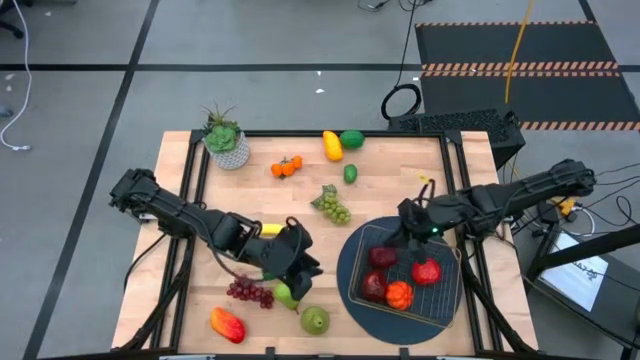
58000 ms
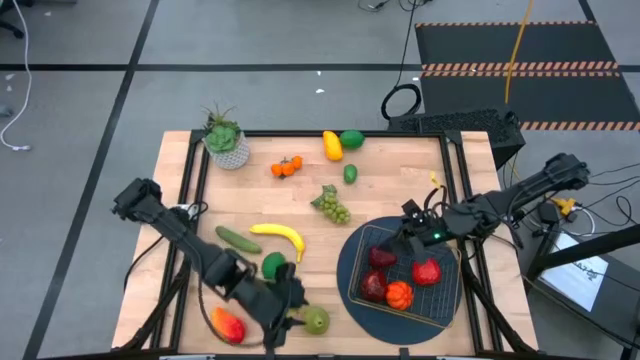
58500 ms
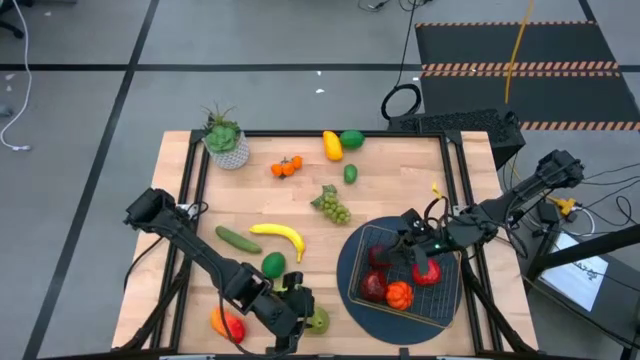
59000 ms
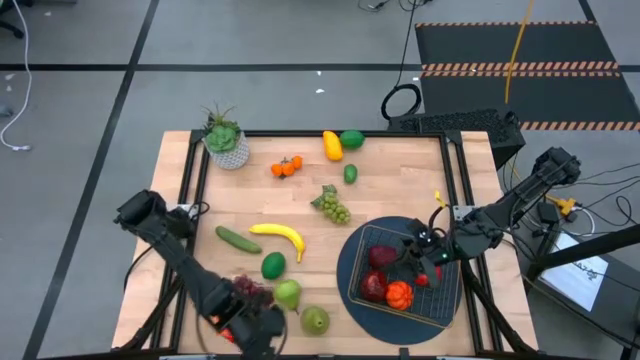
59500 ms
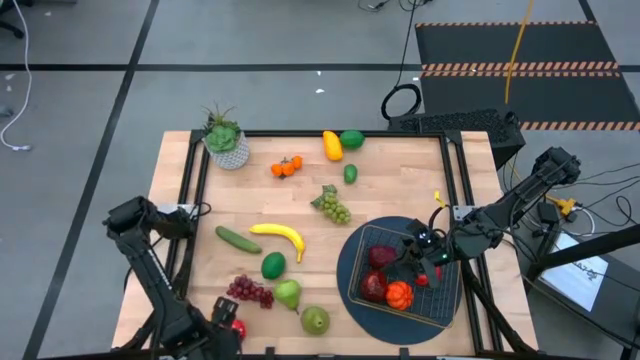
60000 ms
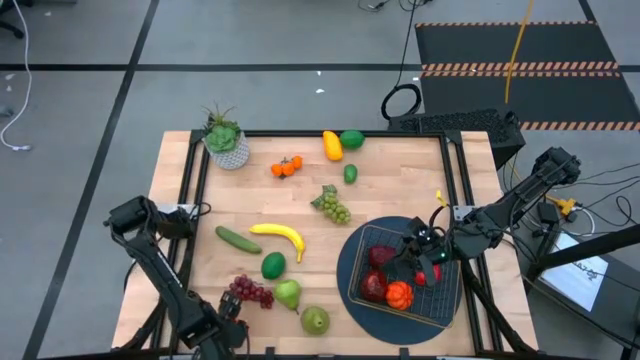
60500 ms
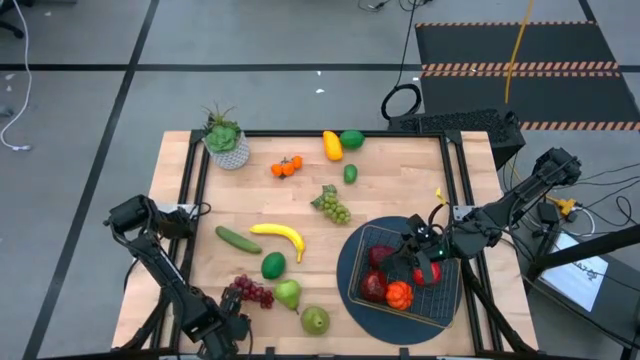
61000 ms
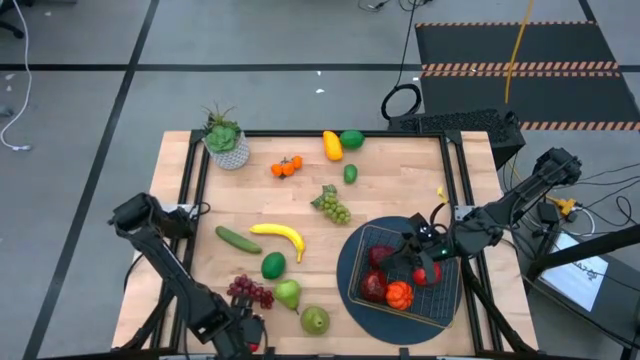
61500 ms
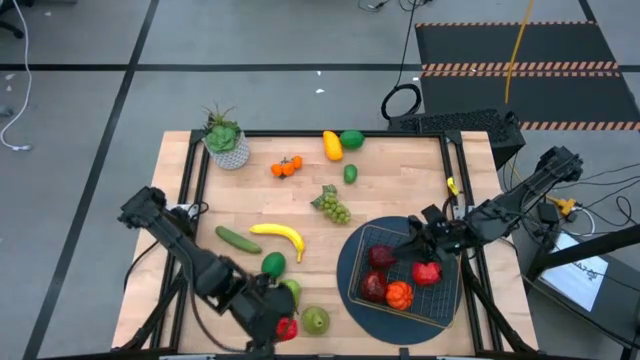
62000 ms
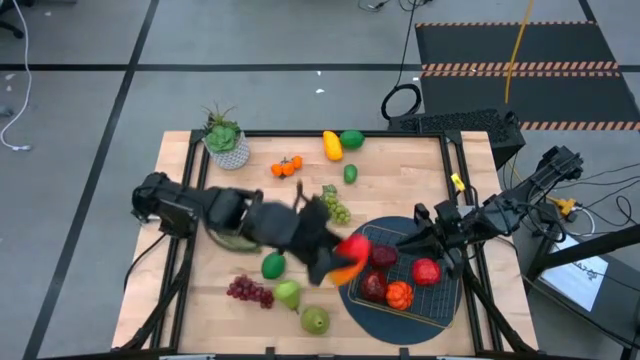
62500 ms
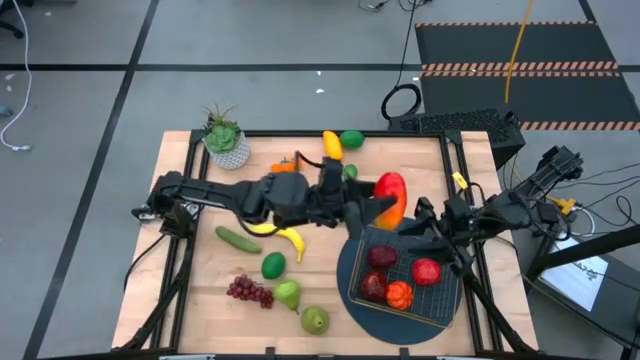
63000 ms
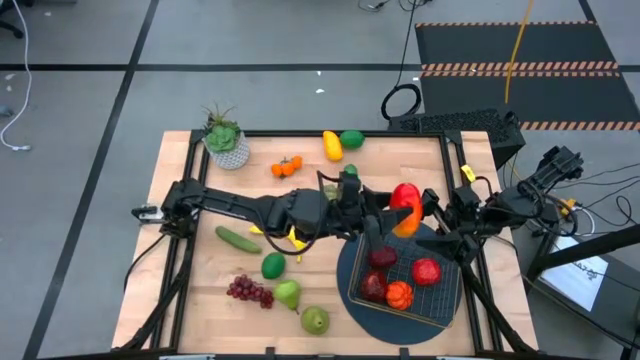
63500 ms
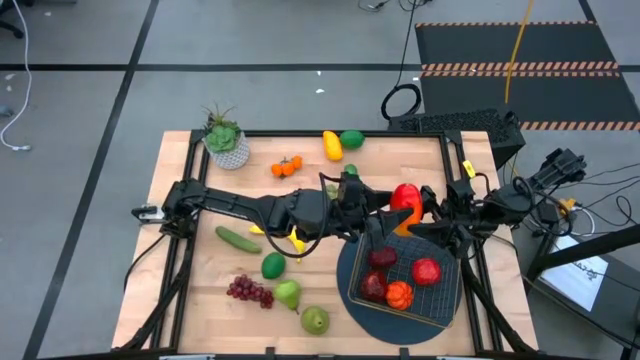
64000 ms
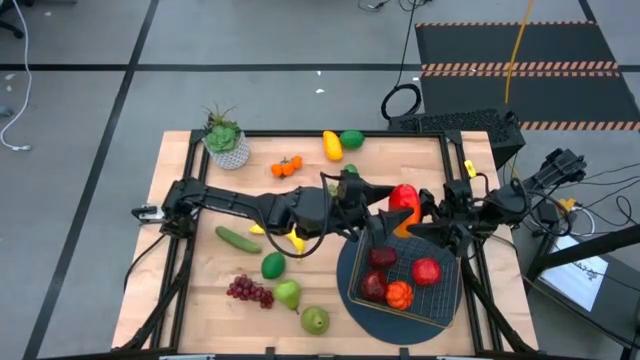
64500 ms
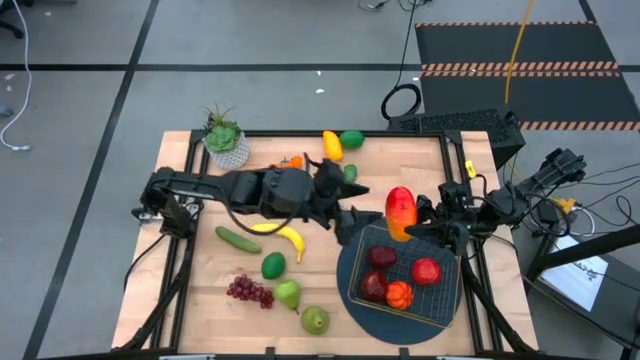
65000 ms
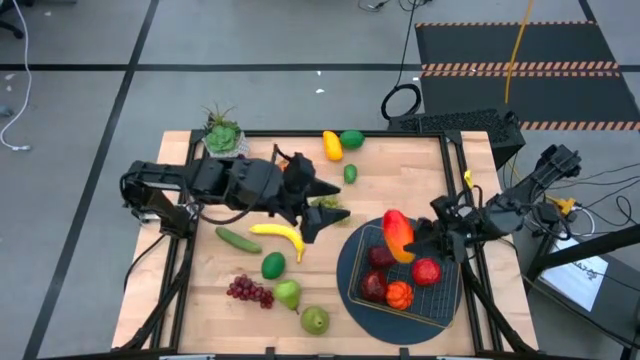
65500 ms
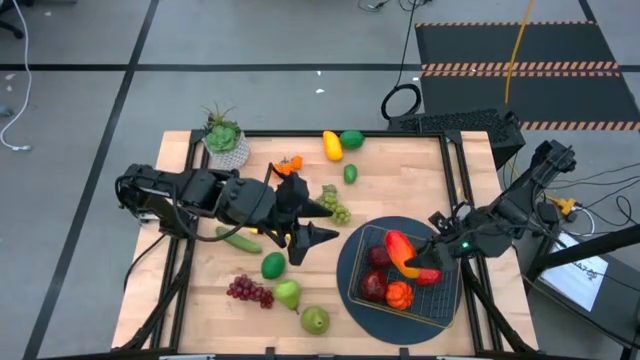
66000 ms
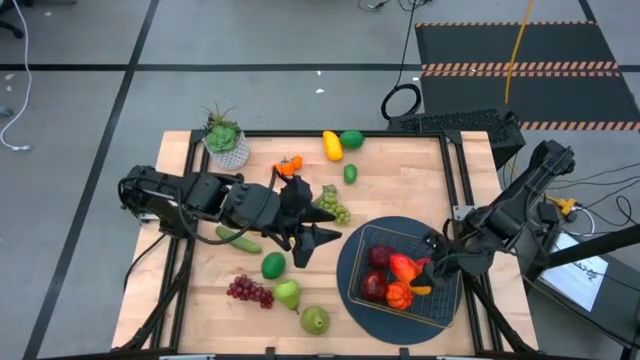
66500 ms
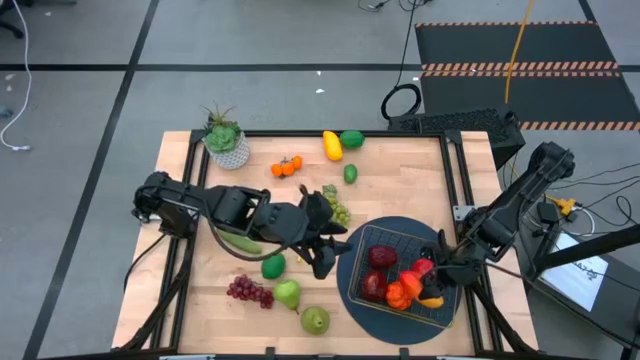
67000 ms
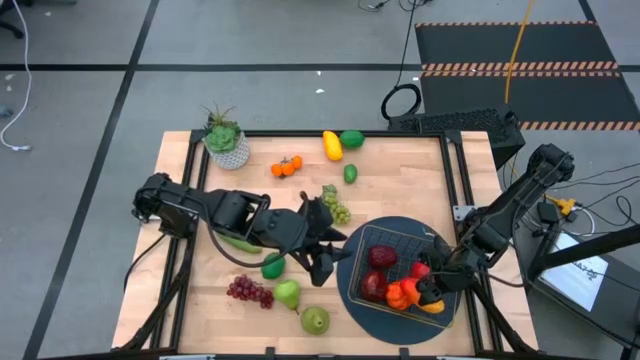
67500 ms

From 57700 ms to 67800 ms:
Task: Build produce basket
Put the bottom mango into the gold wire basket

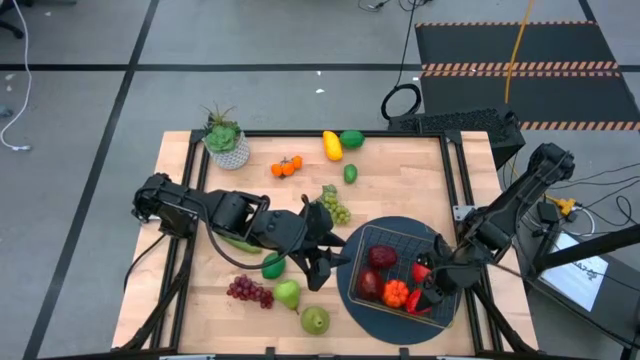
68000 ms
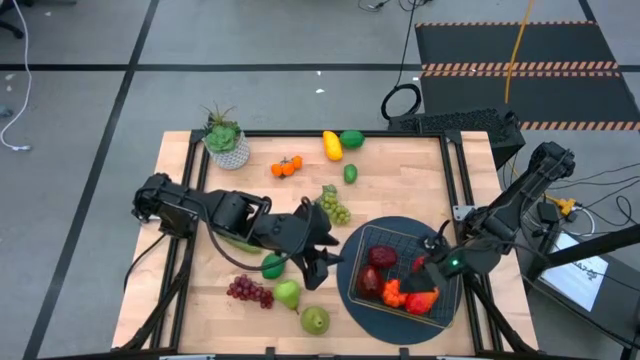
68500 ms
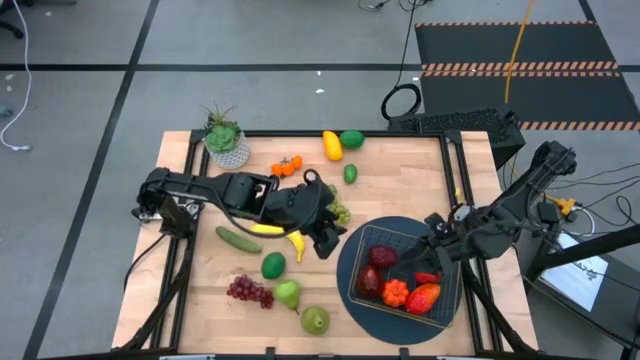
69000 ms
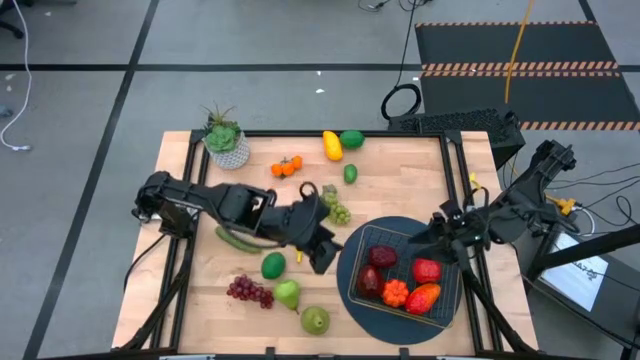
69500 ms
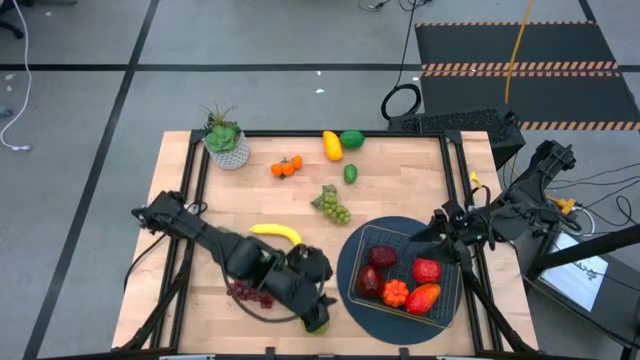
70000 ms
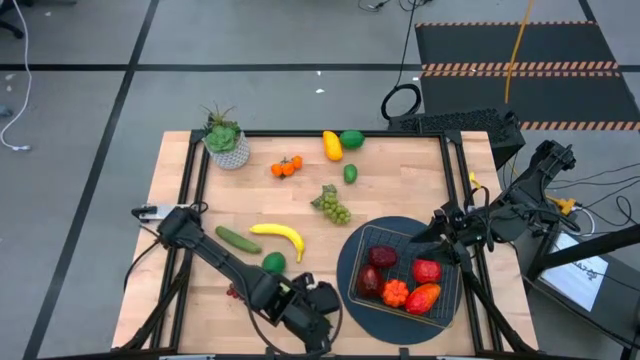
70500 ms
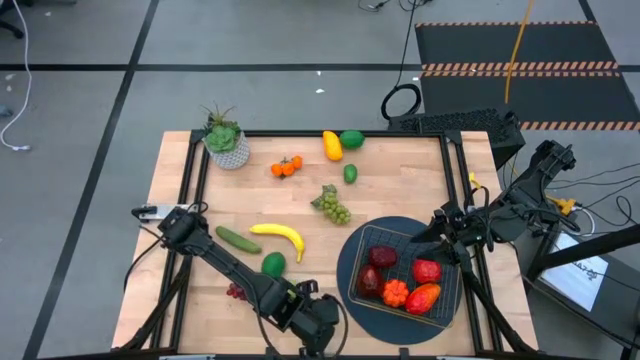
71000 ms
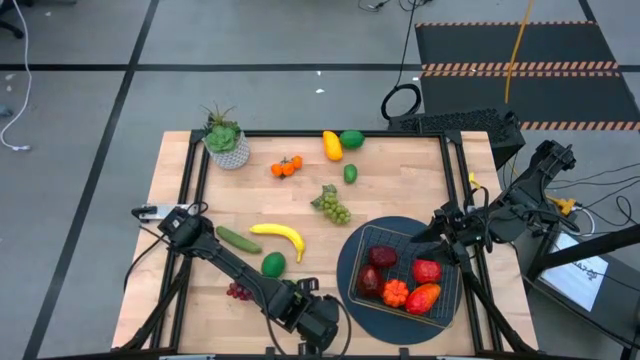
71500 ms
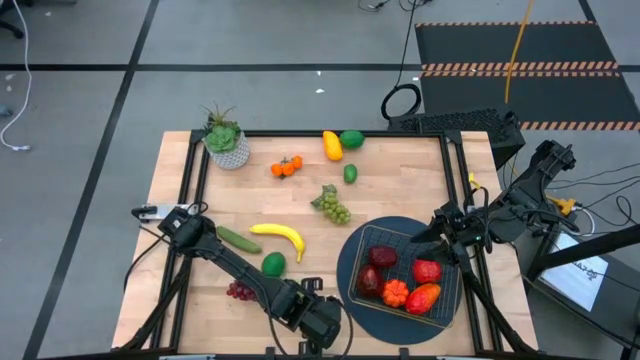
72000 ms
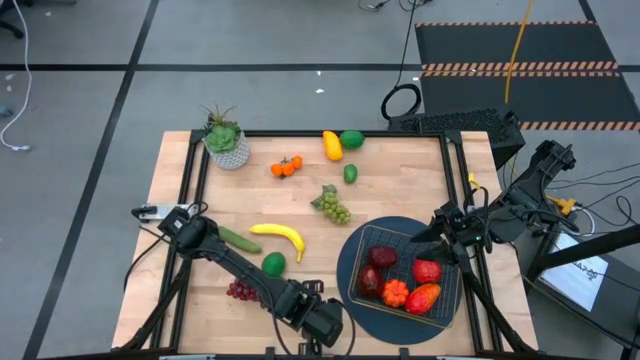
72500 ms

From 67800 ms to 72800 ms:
Put the bottom pear into the gold wire basket

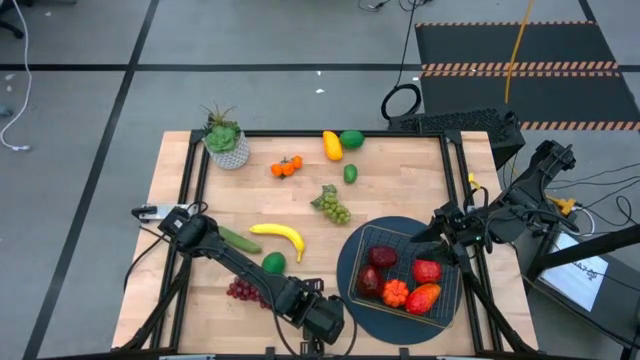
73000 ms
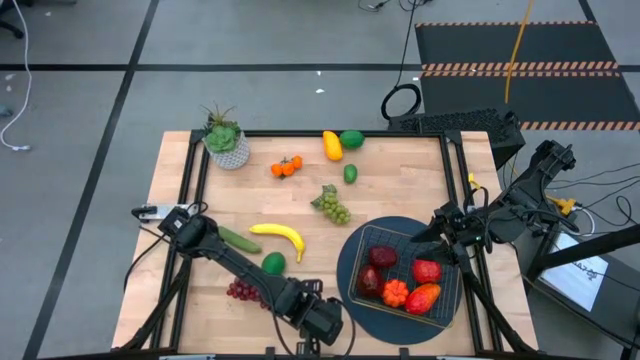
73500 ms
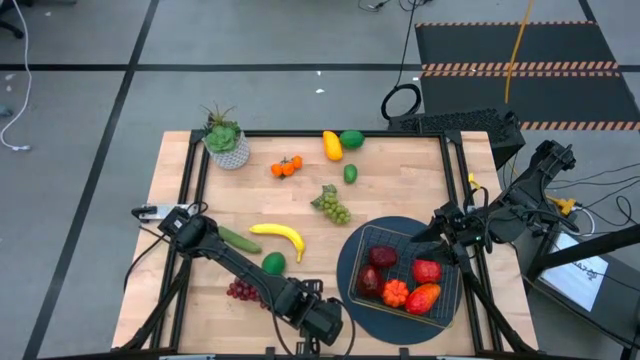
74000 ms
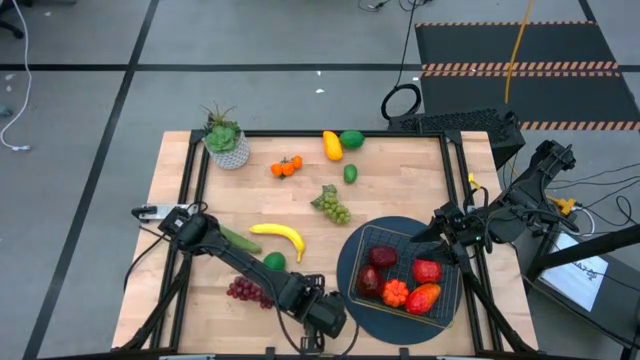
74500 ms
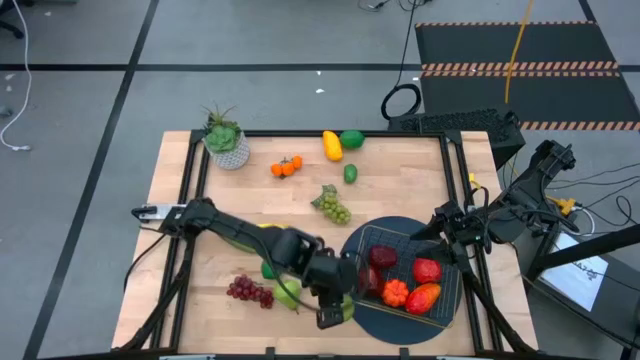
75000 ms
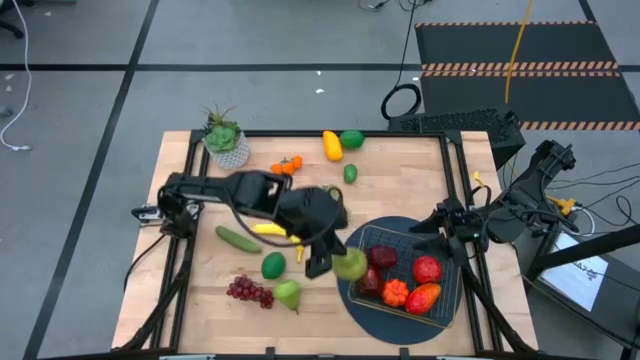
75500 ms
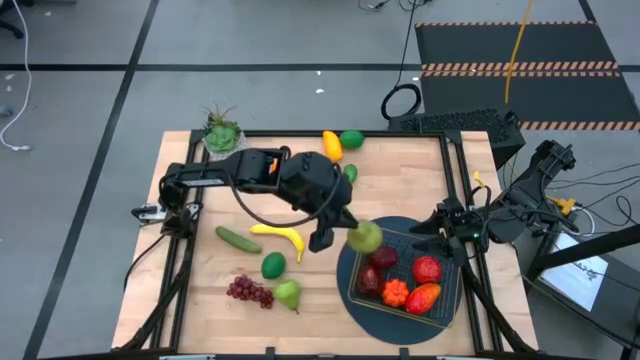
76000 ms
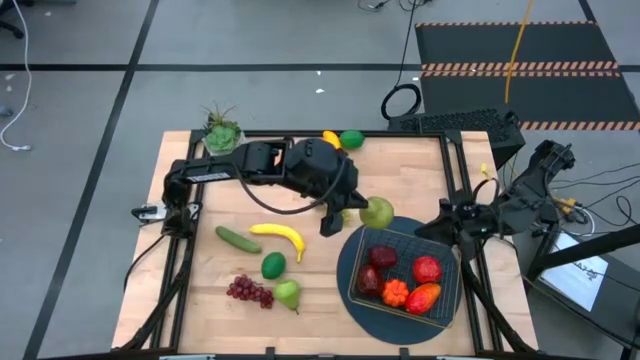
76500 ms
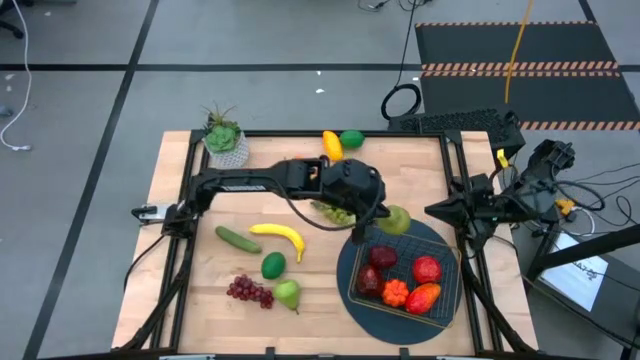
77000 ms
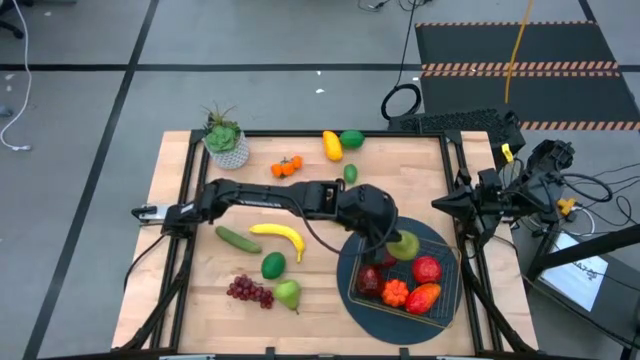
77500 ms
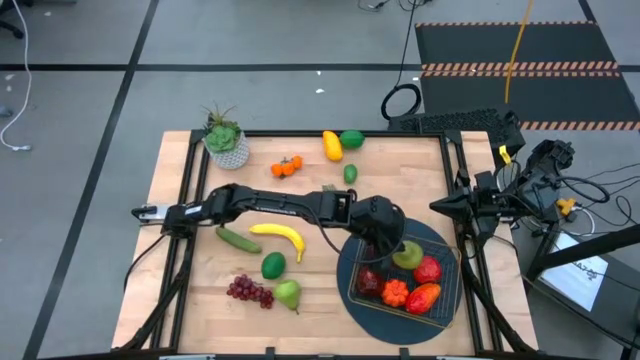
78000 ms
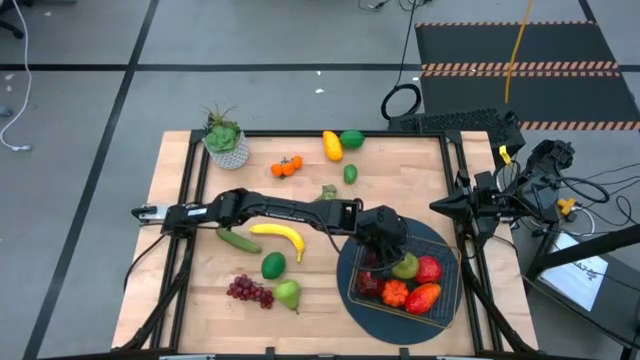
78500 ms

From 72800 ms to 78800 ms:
Put the bottom pear into the gold wire basket

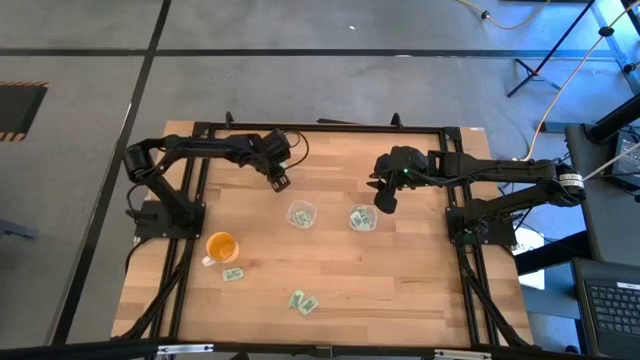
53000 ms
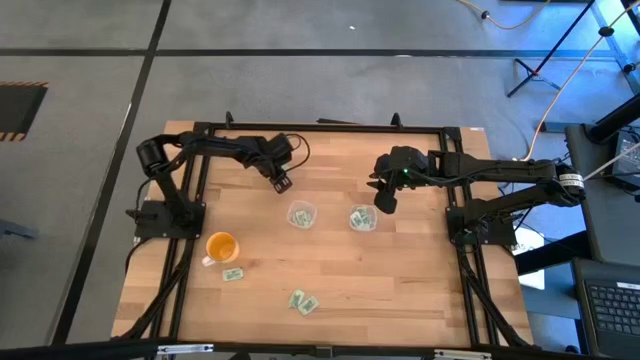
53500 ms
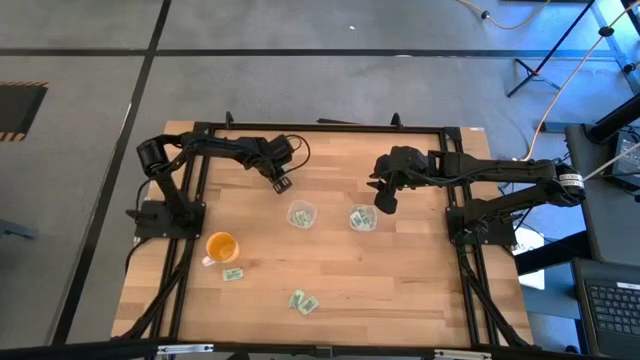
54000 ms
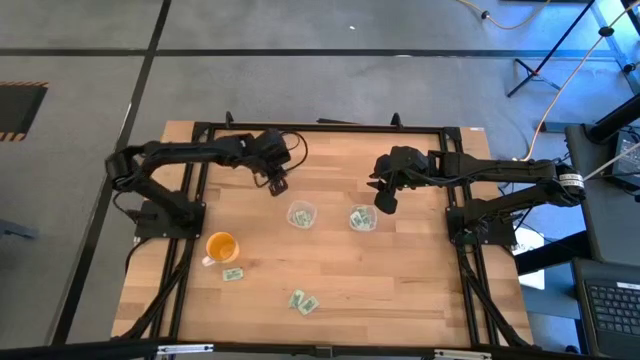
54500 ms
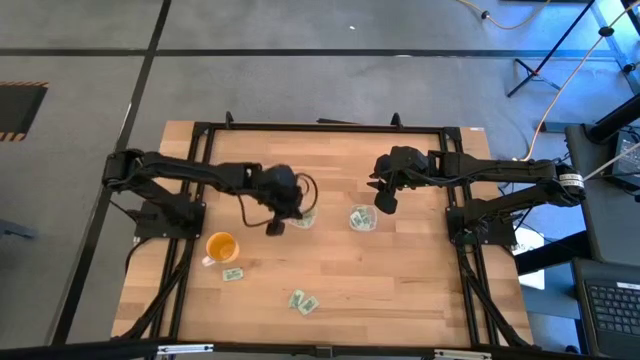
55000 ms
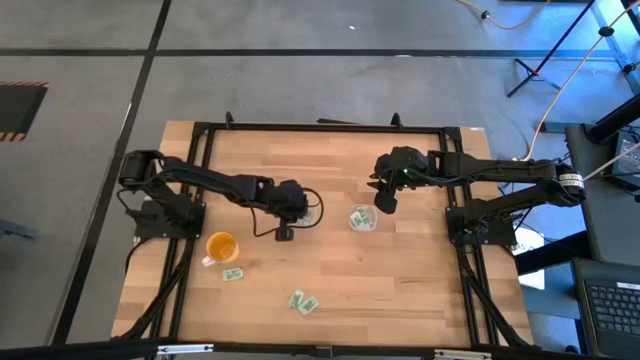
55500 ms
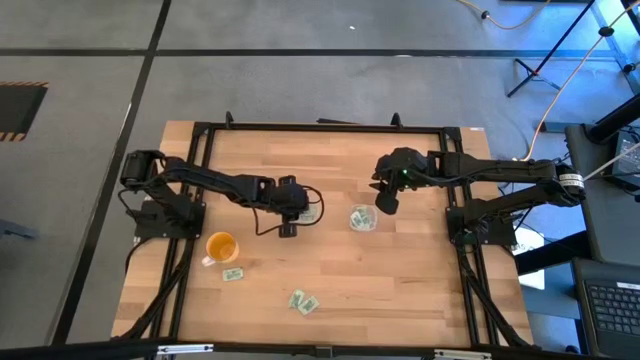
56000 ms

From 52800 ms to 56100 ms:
Task: Pick and place Stevia / Truvia into bins
Put the stevia packet into the left transparent container
